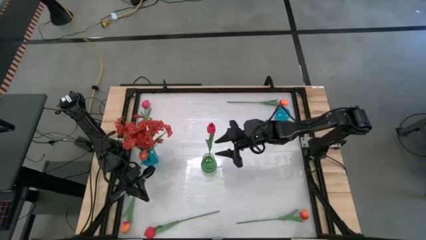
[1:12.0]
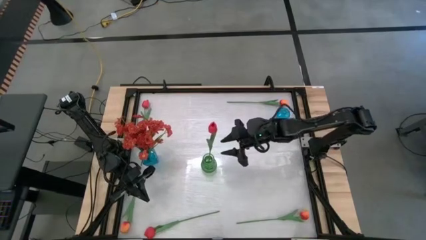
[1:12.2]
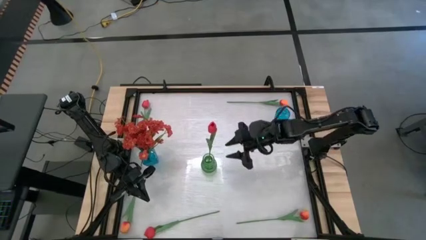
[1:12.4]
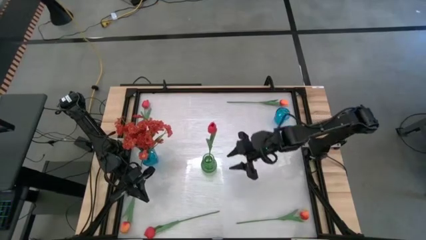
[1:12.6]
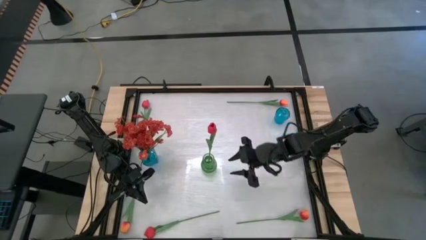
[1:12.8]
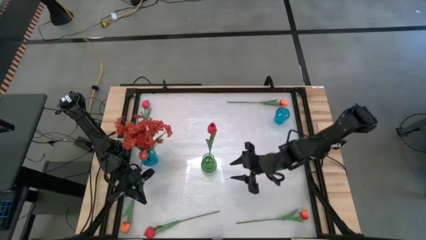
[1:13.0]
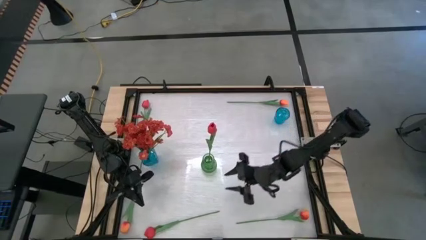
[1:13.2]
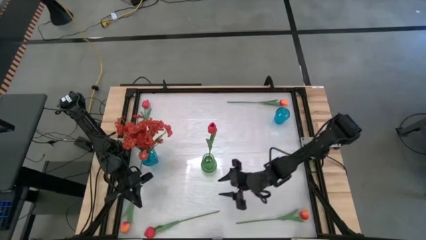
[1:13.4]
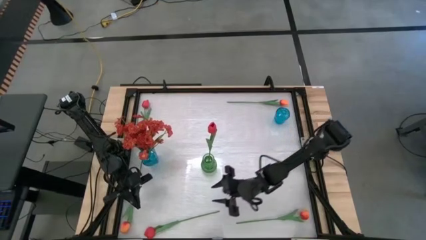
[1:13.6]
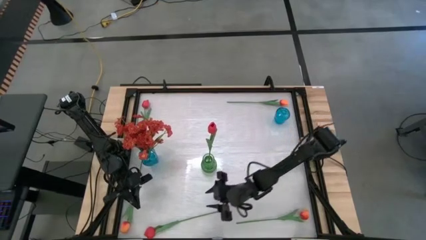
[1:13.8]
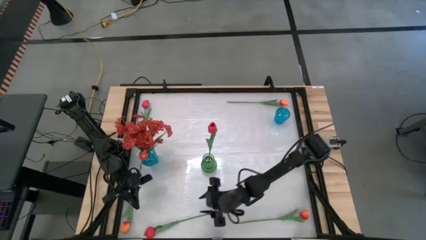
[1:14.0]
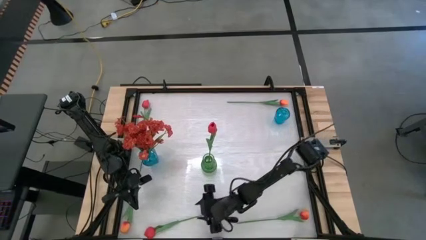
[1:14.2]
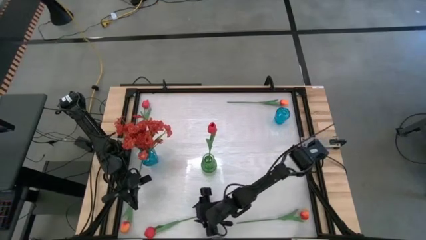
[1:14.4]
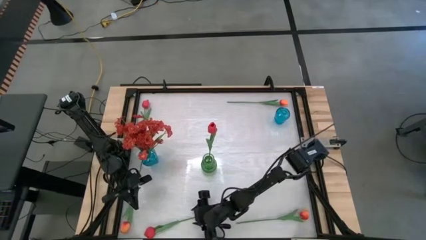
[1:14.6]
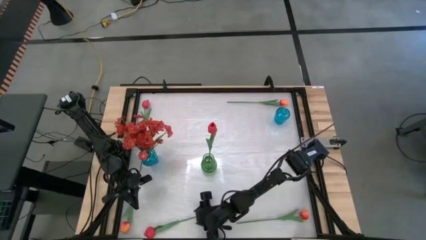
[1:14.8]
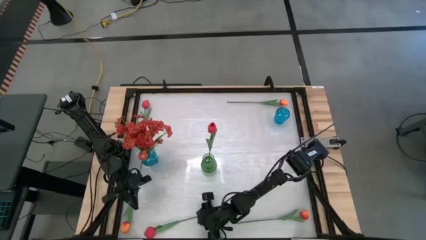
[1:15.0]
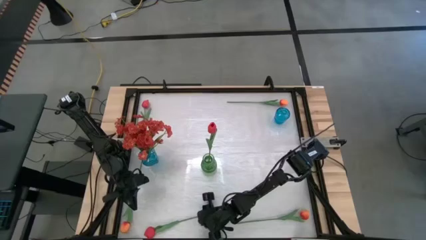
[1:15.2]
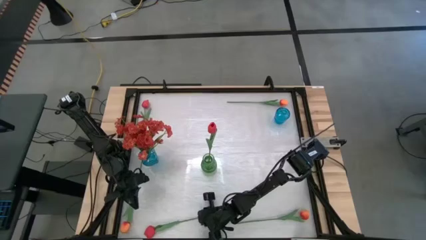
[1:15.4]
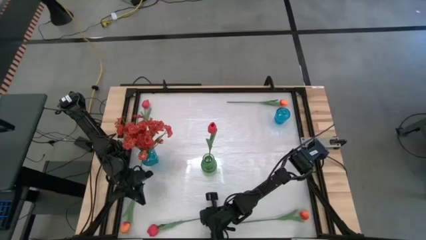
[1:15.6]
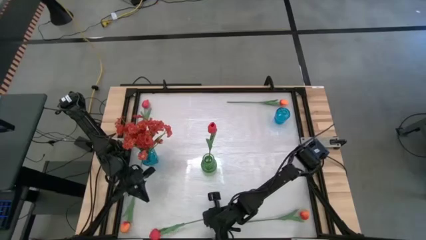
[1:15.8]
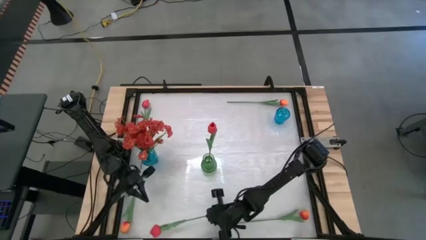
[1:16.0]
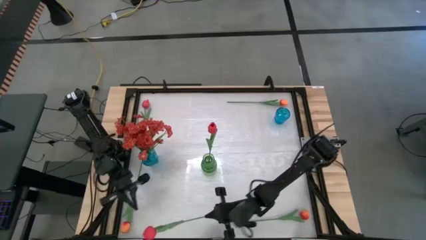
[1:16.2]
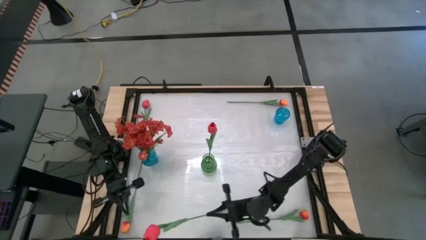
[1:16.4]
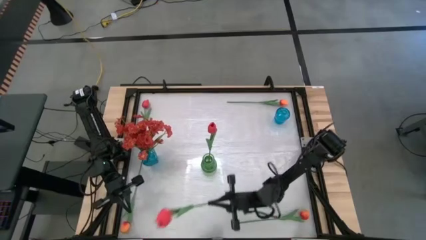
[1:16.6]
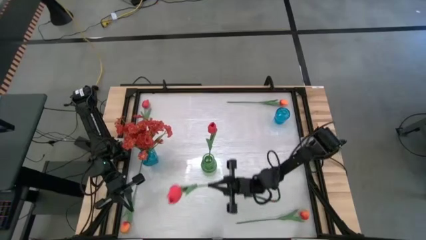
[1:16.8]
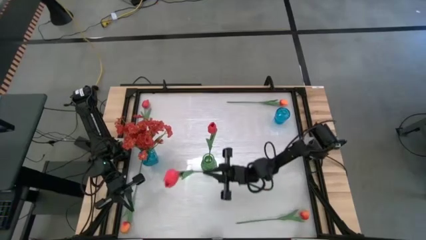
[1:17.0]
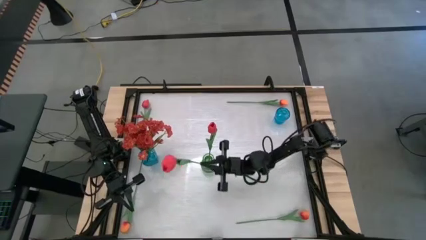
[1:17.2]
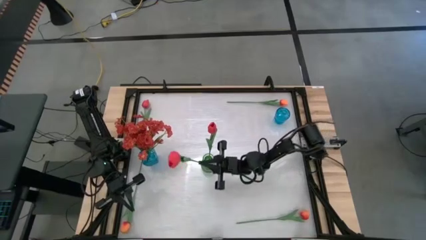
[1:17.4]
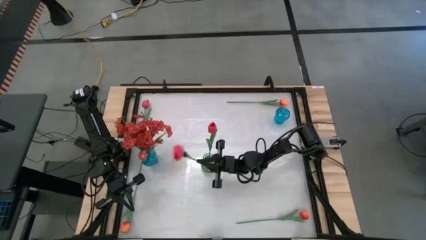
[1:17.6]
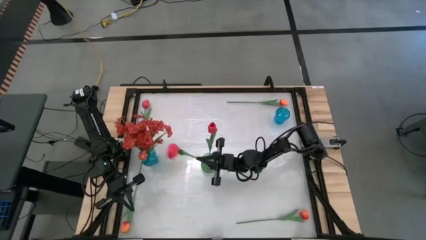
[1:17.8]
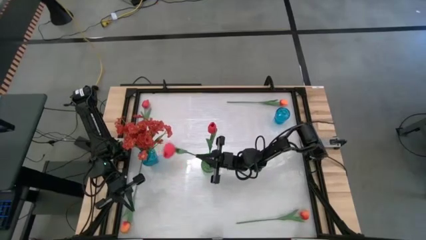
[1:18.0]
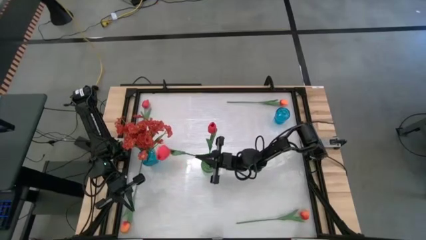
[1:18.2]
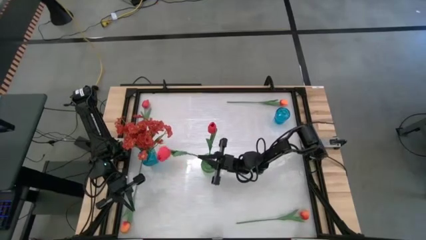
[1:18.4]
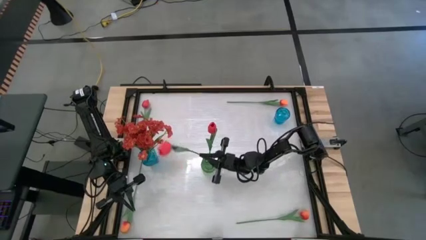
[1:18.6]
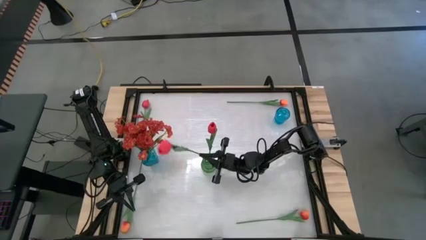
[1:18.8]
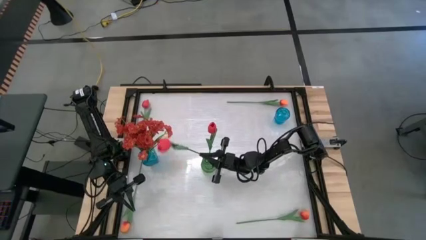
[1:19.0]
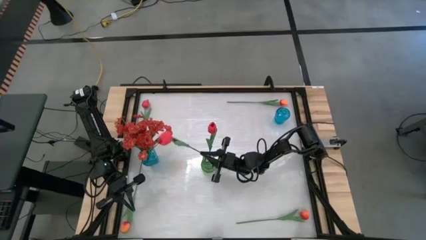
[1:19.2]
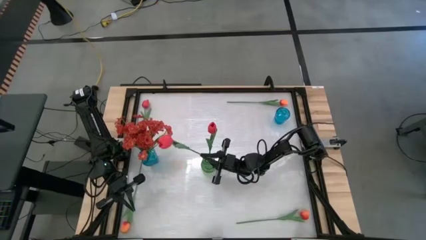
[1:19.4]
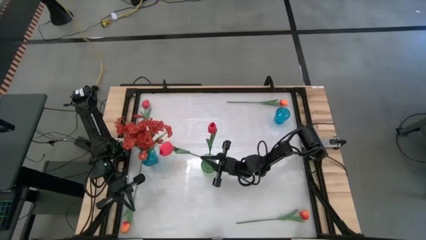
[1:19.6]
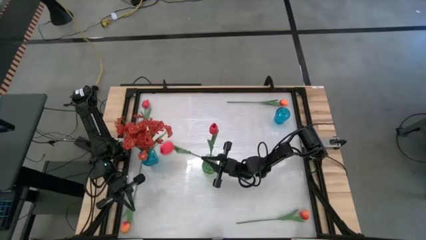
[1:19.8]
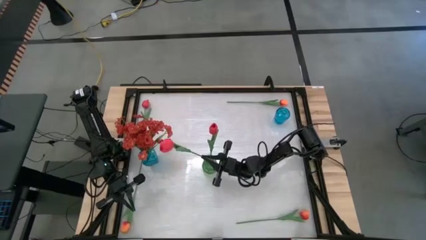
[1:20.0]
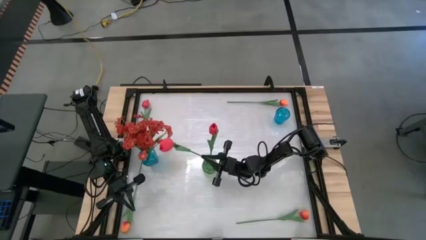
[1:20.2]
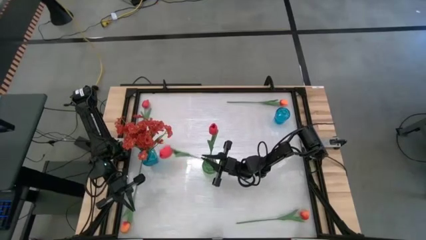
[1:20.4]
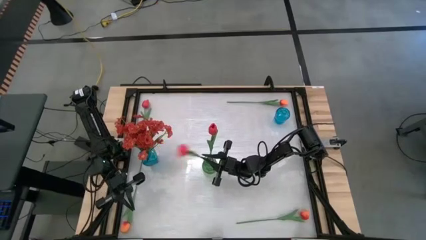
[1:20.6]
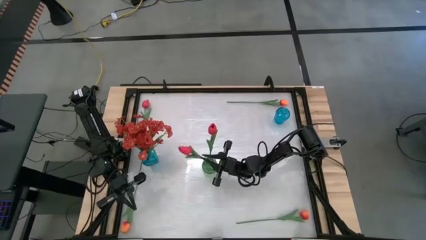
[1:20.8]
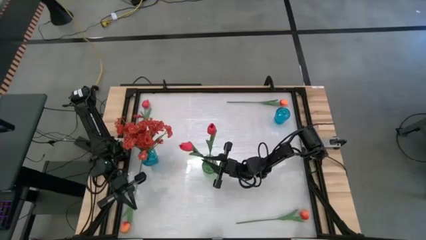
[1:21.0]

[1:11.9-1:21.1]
Task: Sort flowers into vase by color
Put the bottom pink flower into the green vase

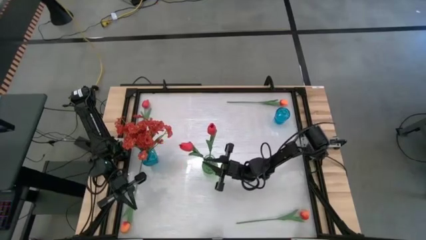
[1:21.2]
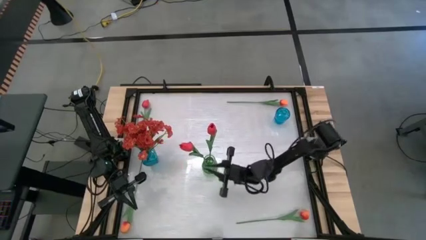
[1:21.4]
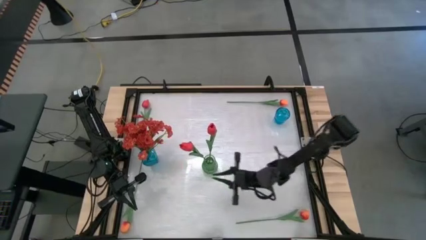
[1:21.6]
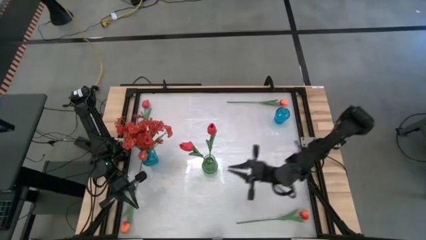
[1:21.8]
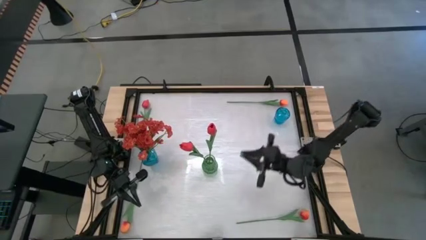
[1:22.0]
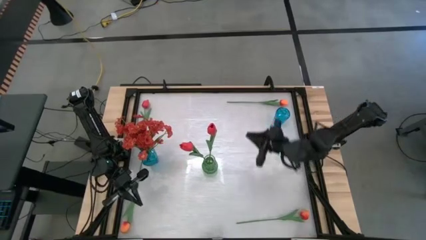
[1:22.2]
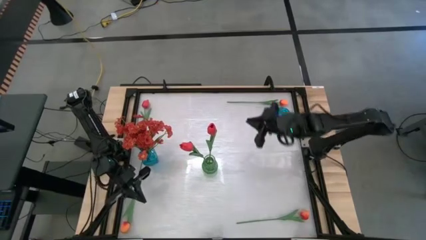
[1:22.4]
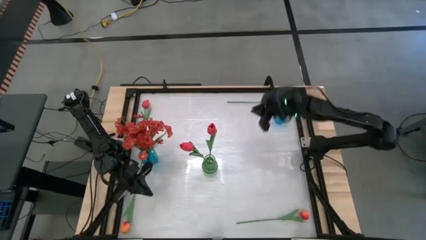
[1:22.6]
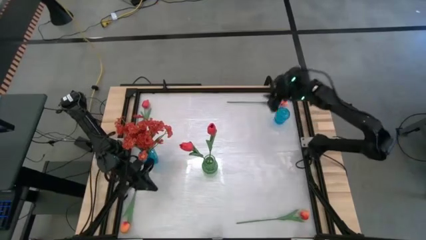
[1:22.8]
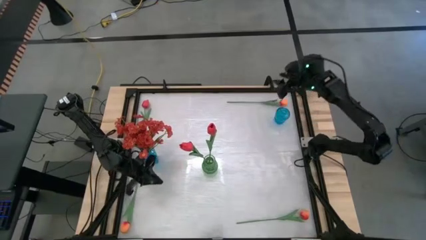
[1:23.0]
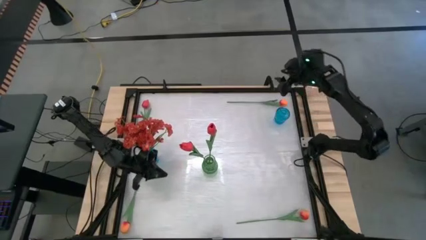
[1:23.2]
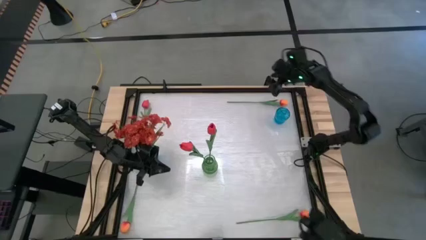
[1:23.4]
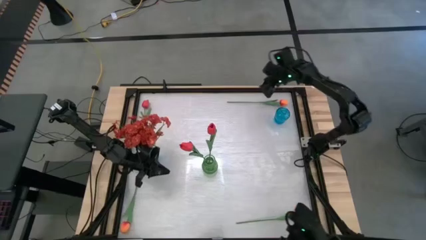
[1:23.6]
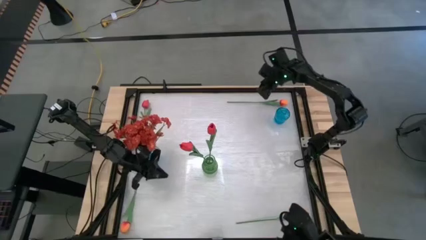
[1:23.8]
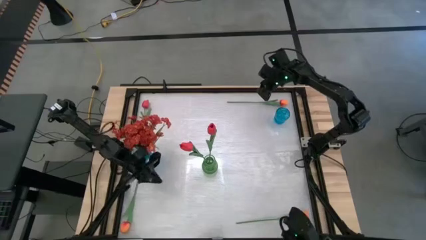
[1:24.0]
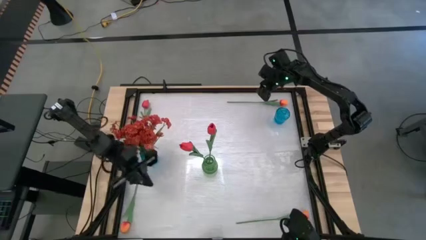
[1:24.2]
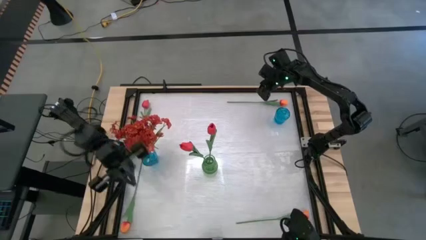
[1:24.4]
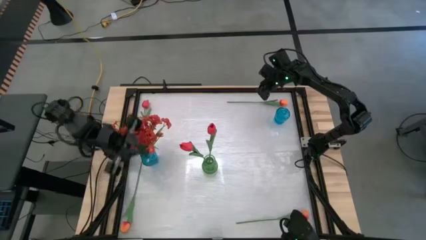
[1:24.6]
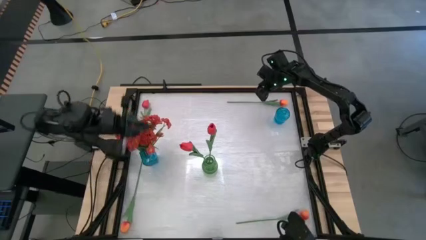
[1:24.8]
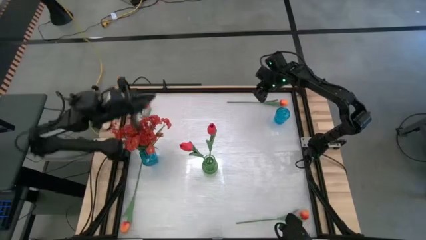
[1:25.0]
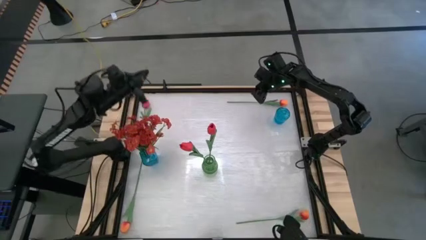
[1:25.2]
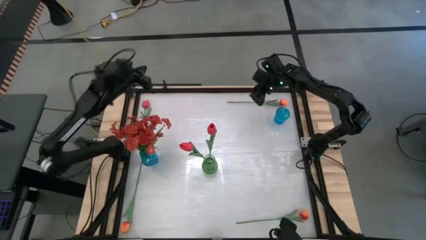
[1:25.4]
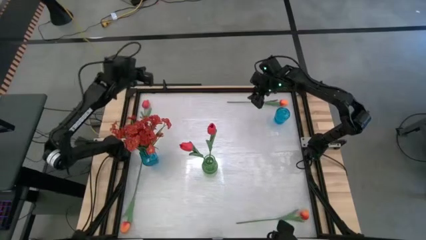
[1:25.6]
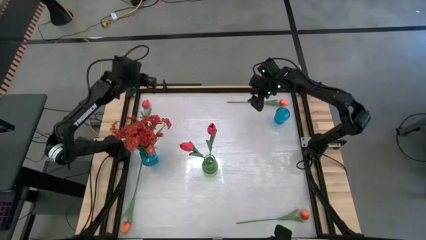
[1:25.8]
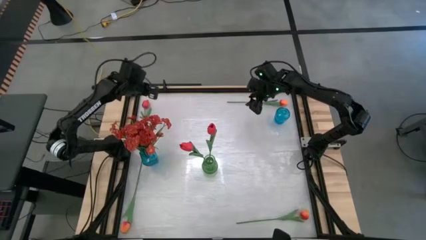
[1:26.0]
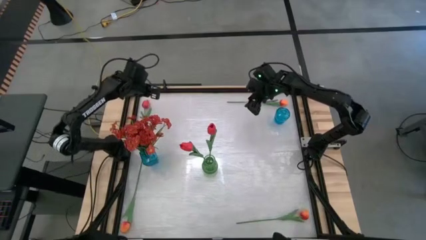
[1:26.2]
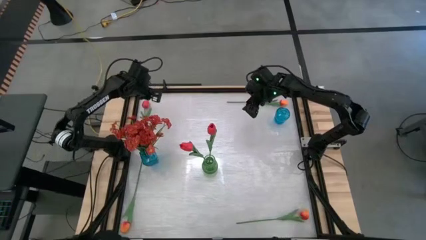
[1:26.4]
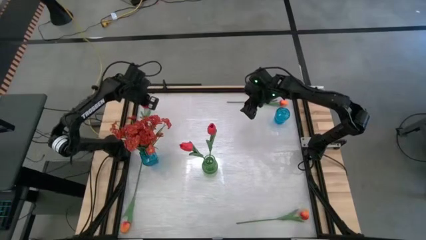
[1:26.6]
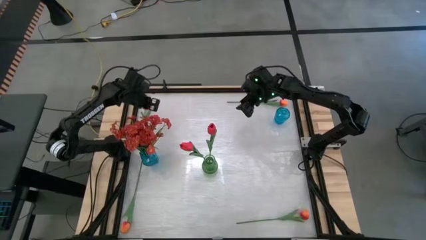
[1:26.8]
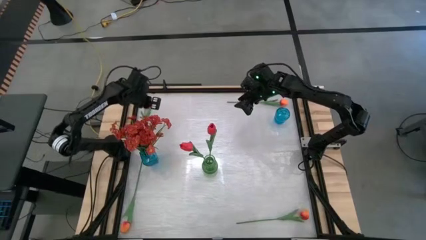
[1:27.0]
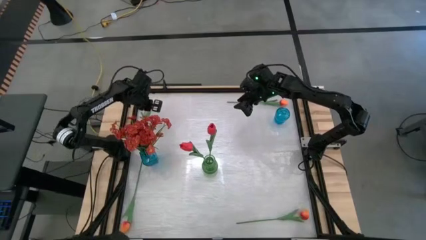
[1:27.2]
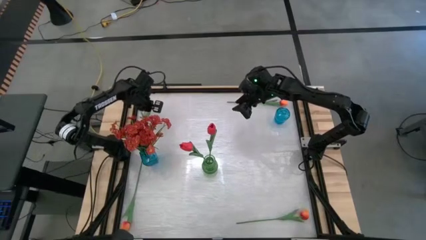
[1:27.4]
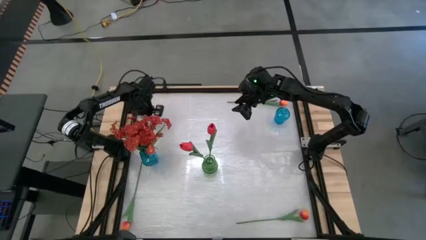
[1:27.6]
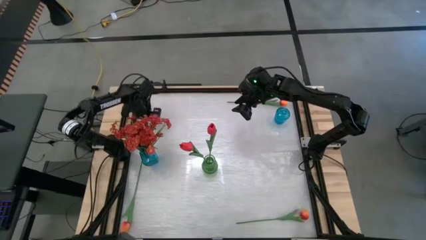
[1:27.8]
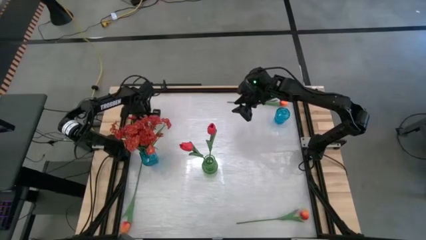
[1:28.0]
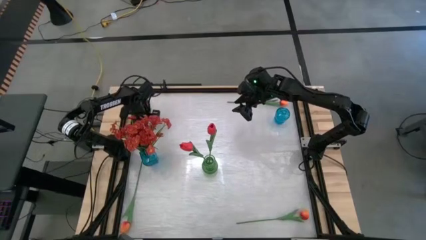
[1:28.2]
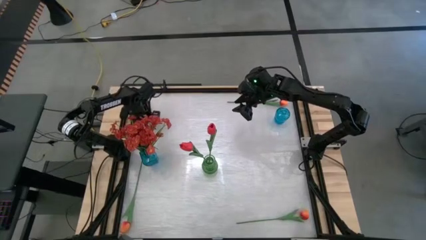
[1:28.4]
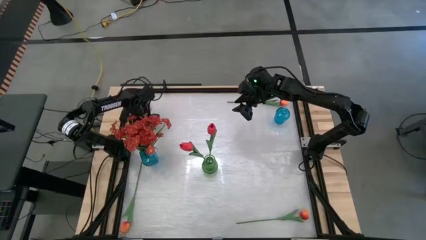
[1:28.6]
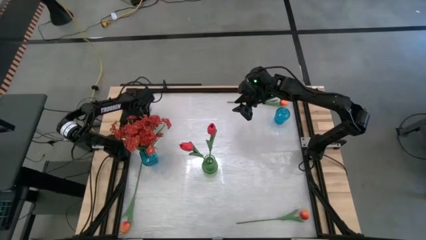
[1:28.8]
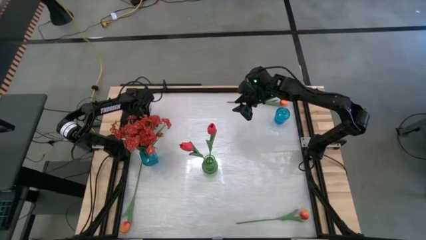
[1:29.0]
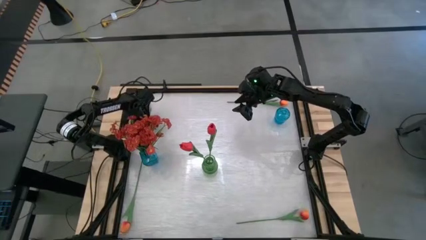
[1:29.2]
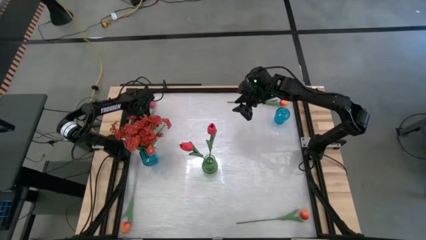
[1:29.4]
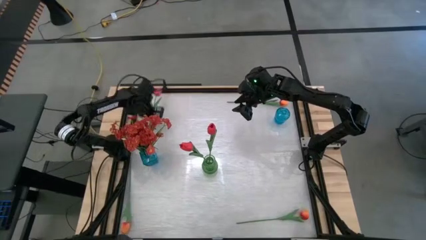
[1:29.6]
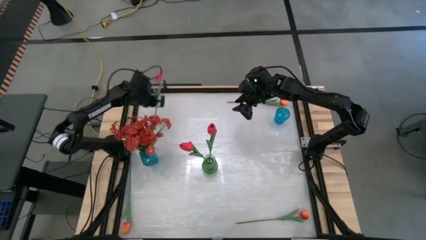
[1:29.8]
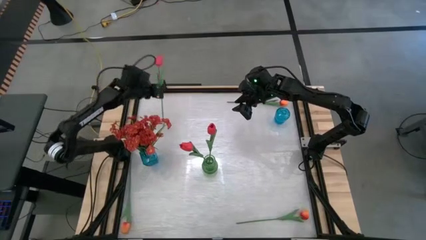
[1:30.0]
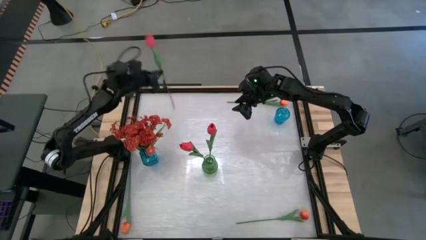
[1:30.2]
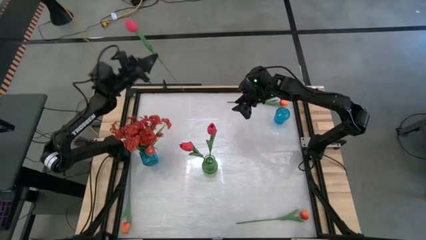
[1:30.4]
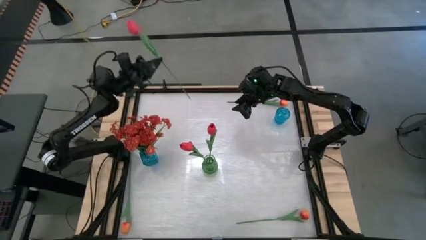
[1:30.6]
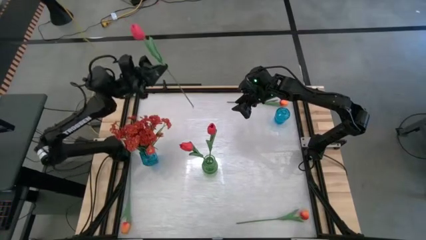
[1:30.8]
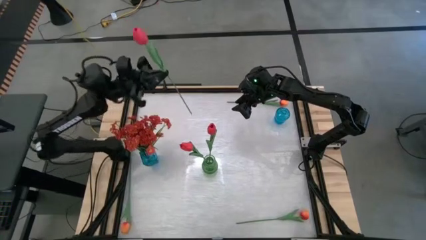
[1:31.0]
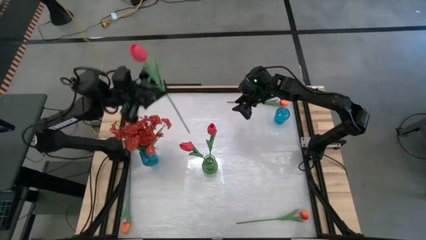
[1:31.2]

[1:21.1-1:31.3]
Put the pink flower into the green vase
